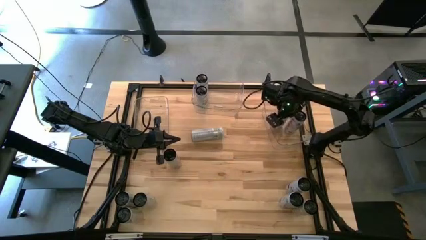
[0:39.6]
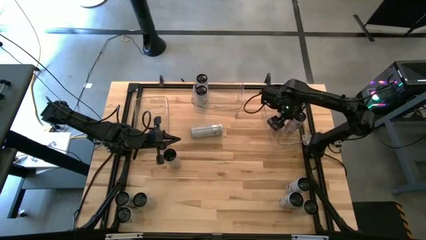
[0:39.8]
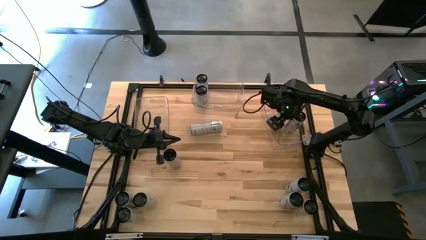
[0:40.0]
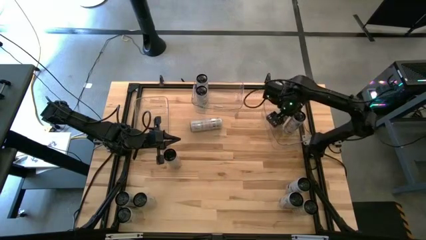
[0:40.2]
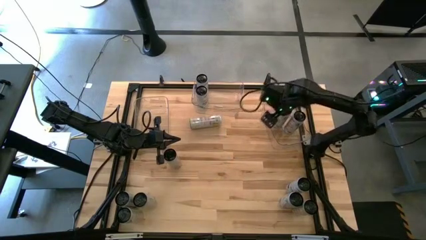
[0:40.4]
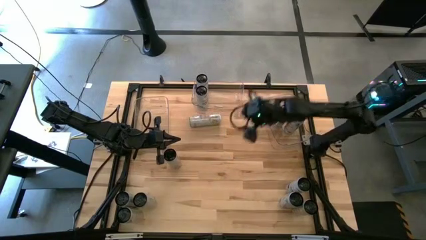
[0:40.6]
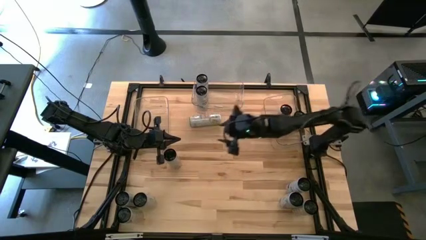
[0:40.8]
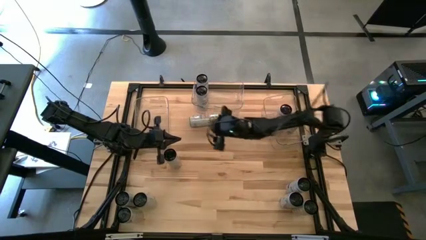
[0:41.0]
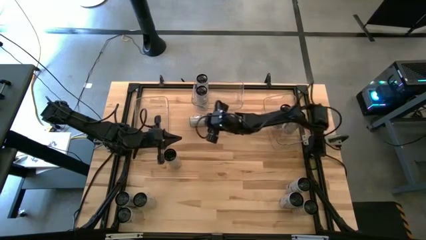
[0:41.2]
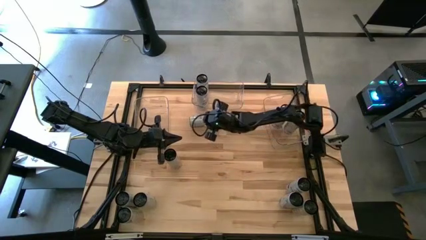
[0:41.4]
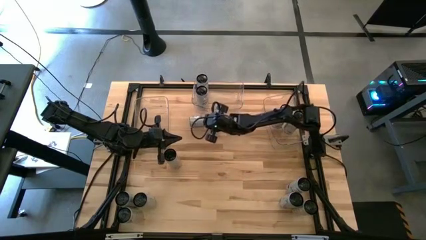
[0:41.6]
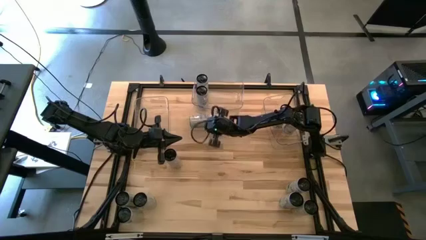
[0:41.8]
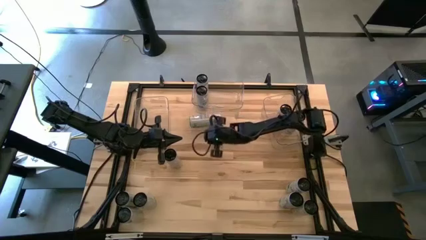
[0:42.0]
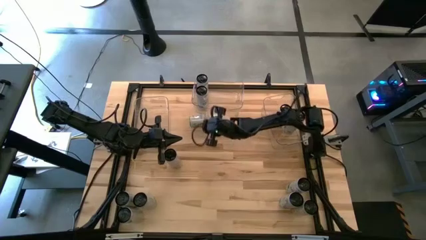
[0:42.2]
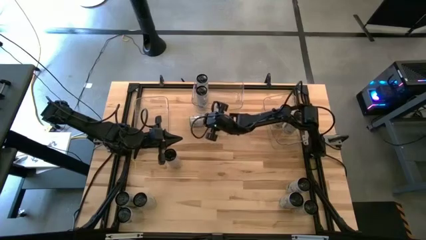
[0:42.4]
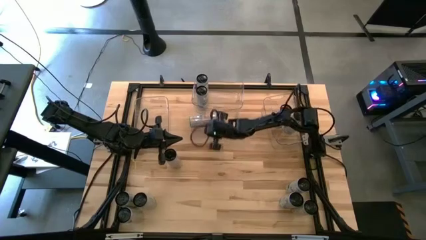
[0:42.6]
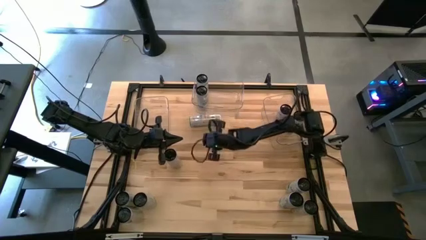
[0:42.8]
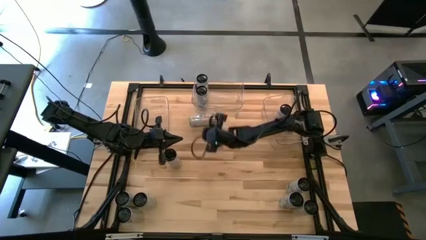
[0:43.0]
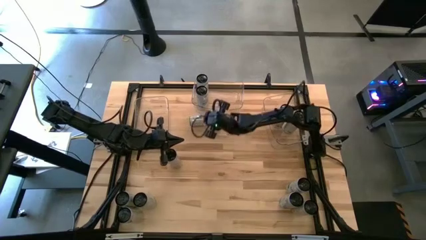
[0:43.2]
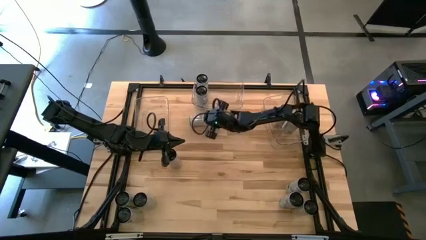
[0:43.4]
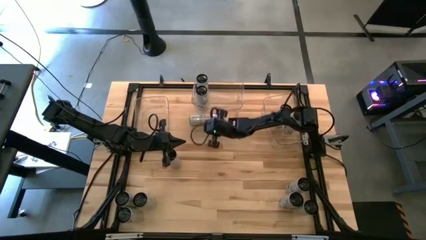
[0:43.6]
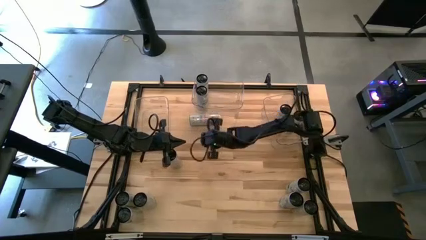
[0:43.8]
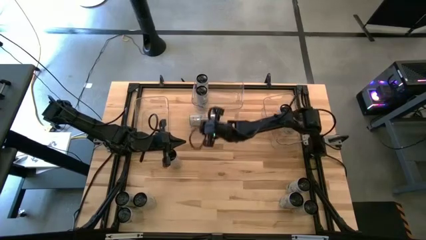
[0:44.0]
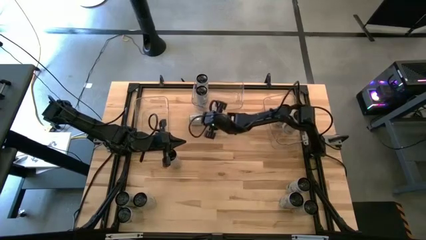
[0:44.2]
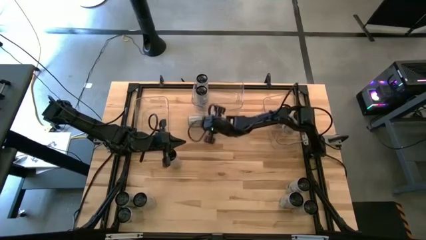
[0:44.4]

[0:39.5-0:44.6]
Task: Sort soda cans
Put the white/yellow soda can into the left transparent bin

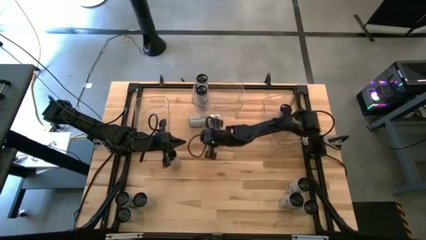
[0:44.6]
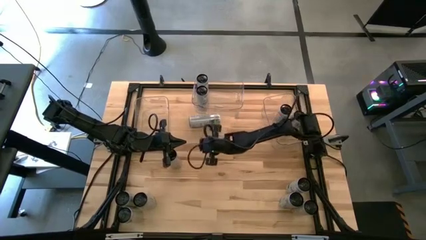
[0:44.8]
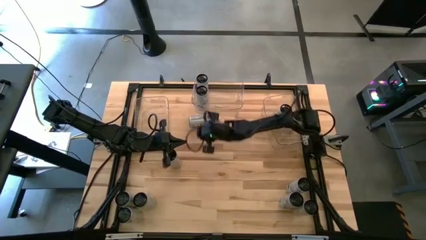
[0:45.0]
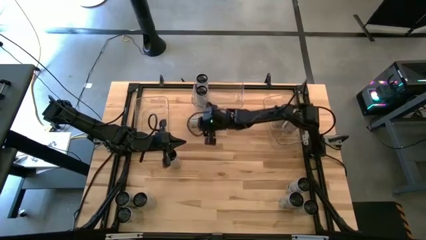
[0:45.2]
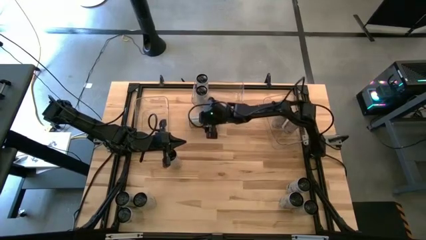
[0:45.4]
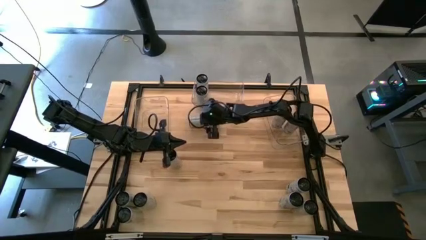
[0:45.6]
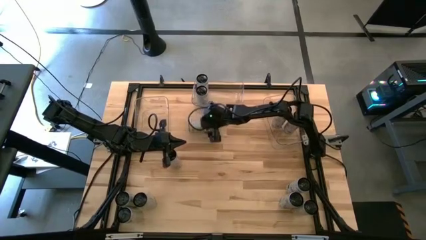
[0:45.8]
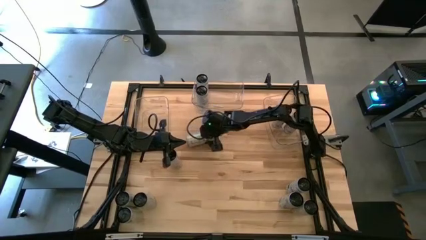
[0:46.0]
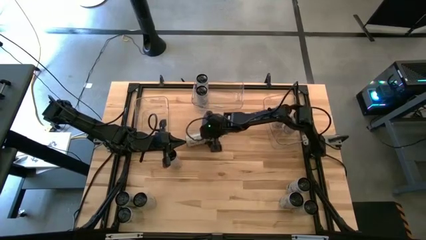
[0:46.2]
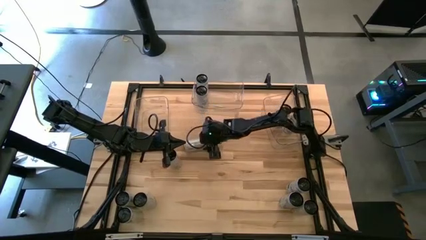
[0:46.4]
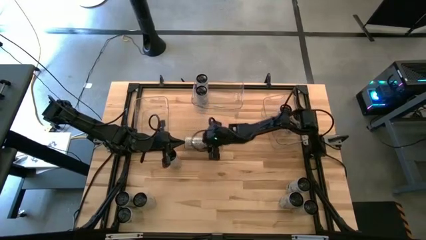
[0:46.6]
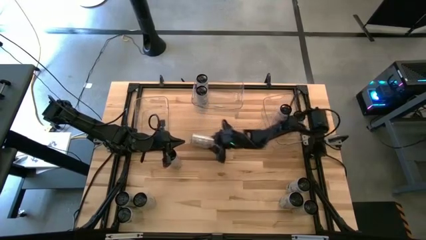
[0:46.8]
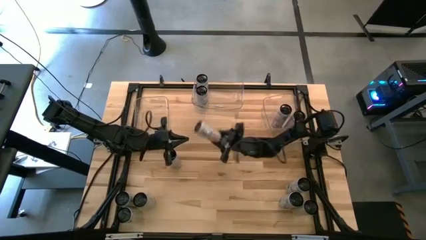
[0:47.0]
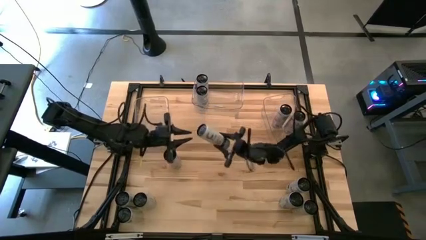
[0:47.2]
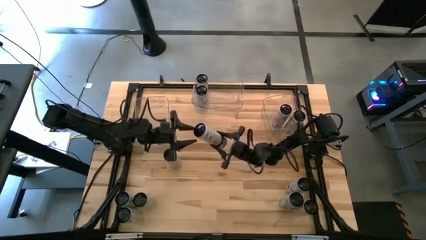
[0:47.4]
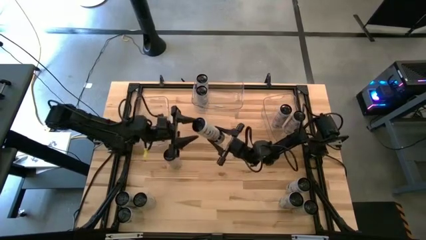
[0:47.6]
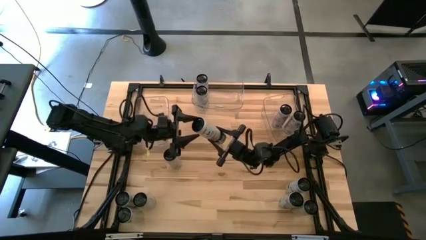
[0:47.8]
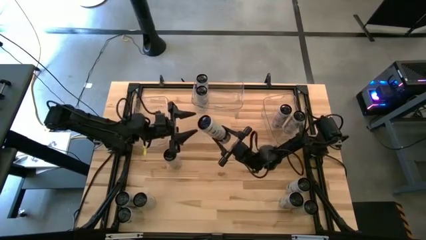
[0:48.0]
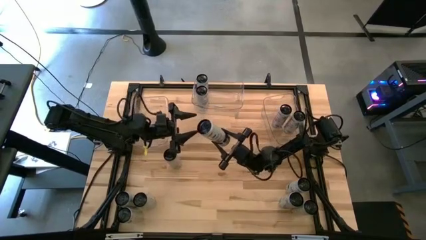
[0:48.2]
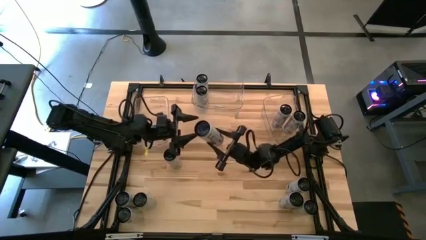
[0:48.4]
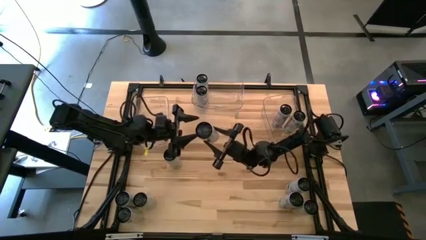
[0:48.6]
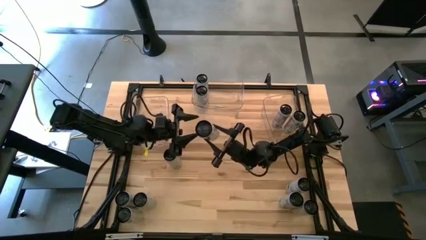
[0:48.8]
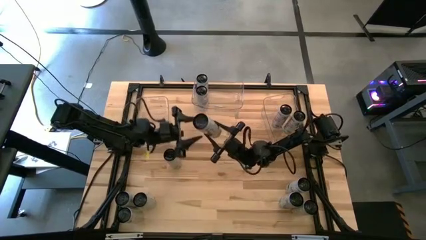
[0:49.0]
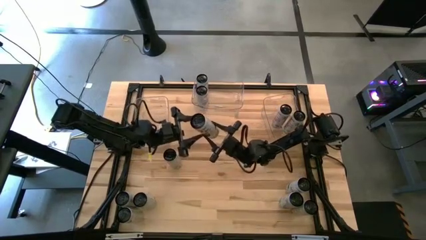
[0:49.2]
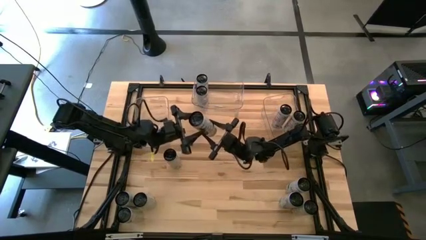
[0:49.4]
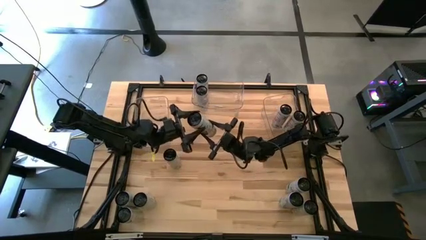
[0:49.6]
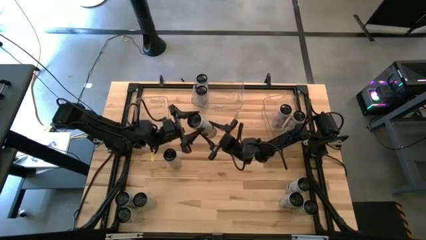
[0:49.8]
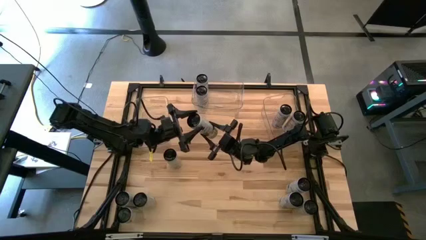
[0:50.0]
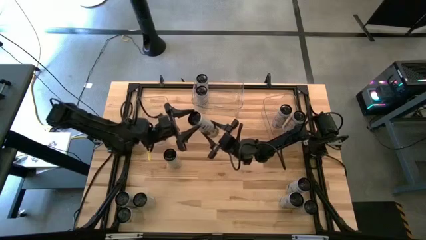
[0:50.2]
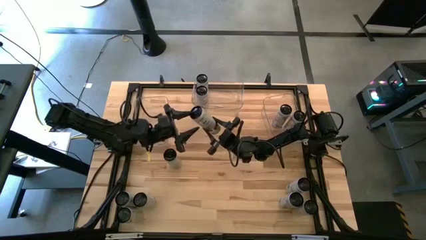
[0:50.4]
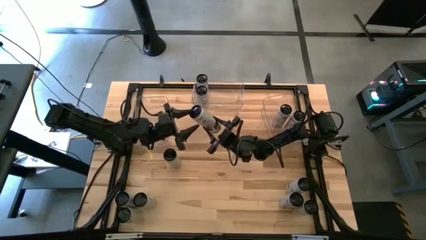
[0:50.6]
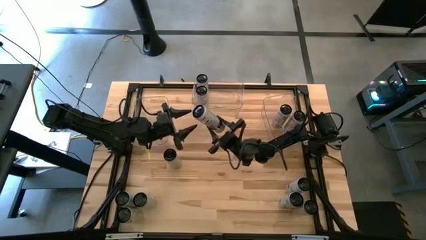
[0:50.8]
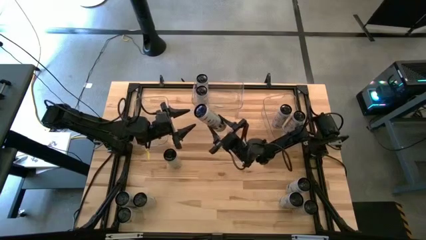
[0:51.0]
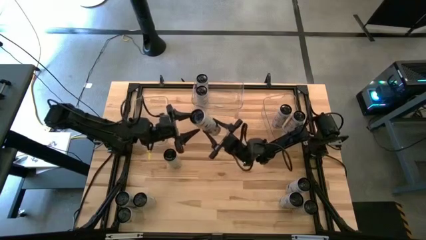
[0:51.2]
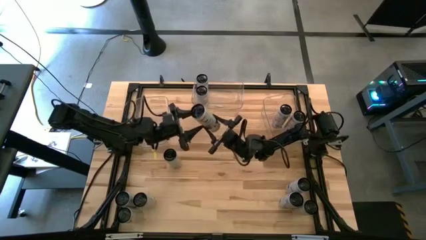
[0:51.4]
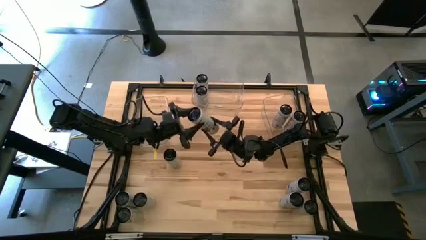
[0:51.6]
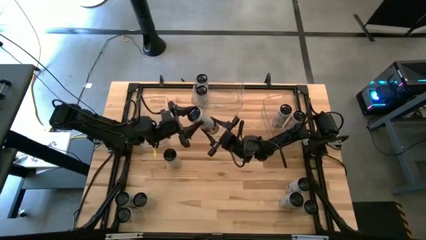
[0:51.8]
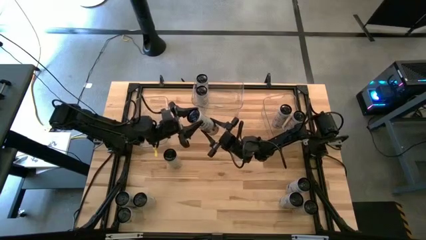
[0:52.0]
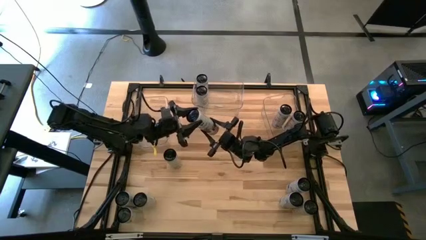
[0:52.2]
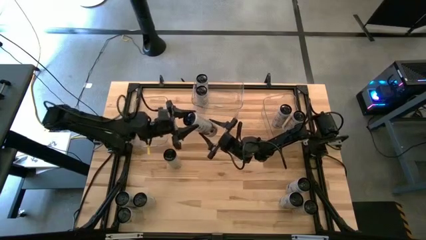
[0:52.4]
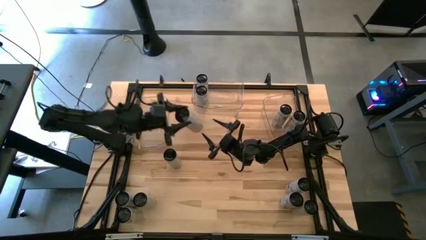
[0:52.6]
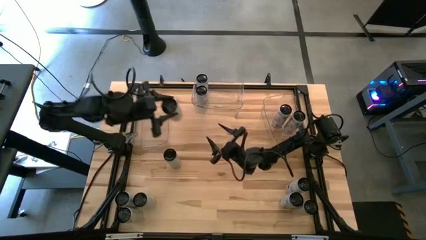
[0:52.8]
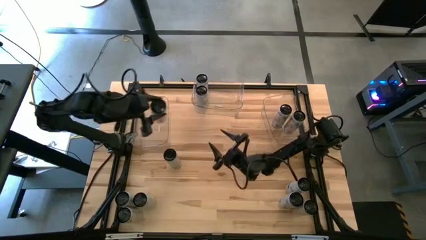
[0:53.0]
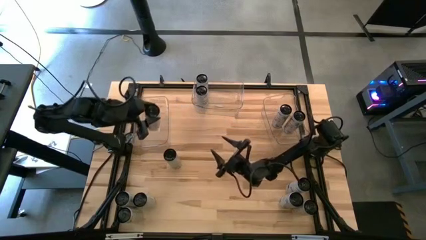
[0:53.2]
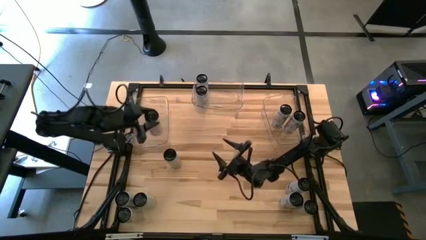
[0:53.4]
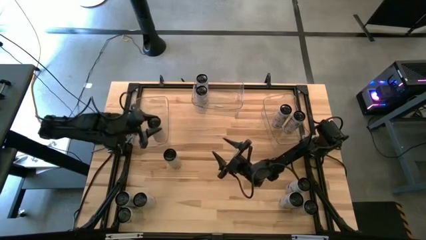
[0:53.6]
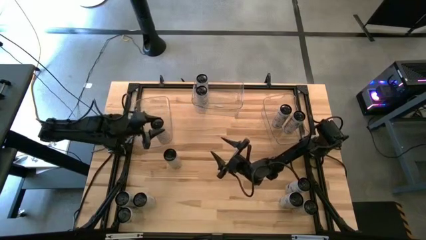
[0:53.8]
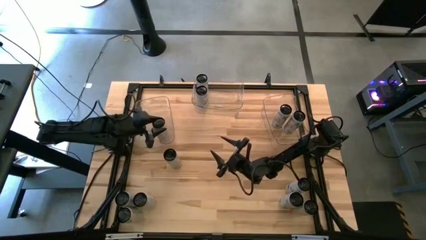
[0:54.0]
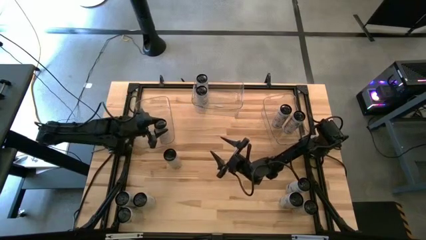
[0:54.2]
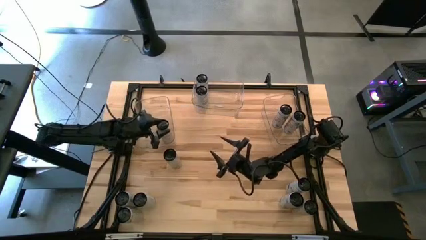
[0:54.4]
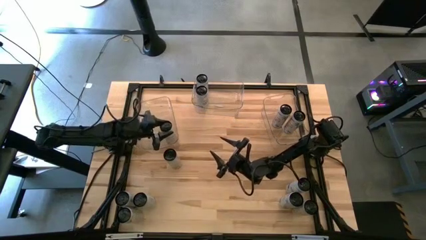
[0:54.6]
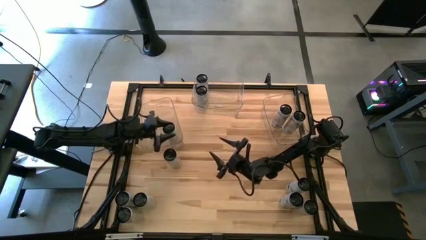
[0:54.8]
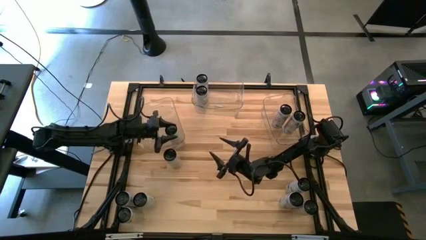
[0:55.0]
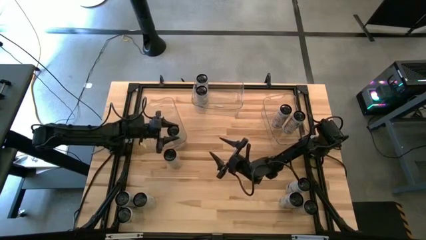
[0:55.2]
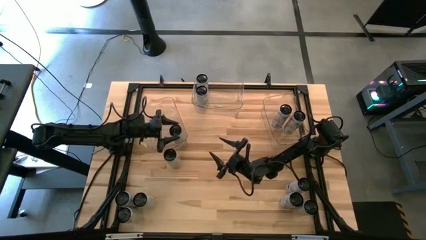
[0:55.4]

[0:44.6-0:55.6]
Put the white/yellow soda can into the left transparent bin
